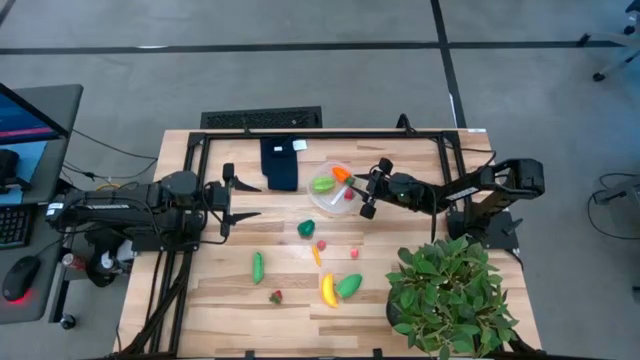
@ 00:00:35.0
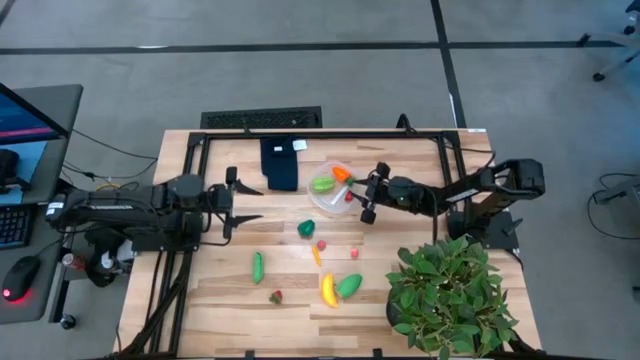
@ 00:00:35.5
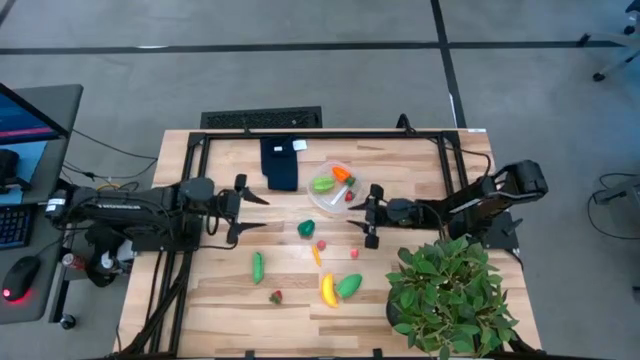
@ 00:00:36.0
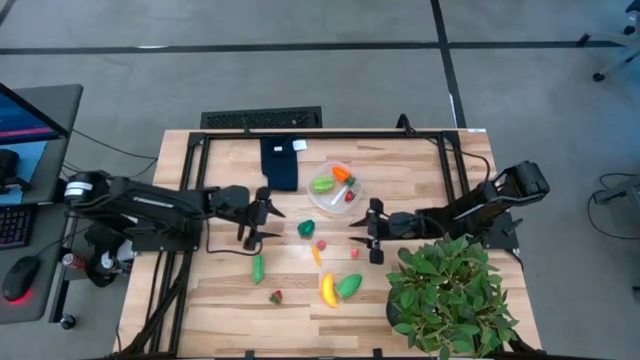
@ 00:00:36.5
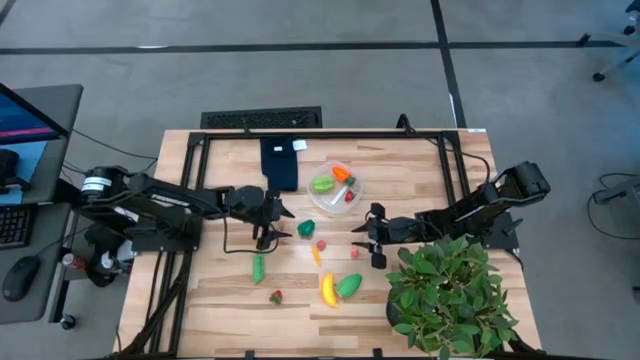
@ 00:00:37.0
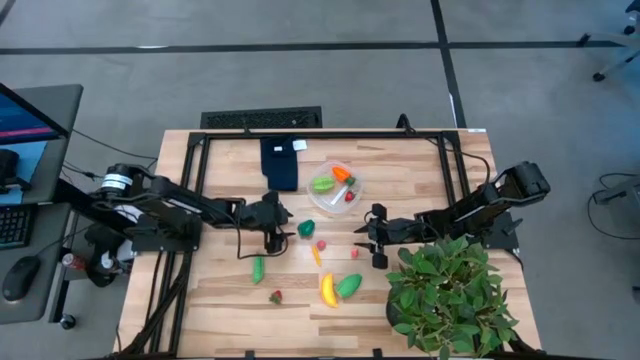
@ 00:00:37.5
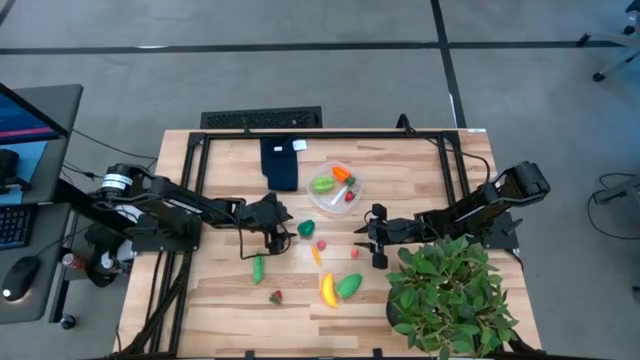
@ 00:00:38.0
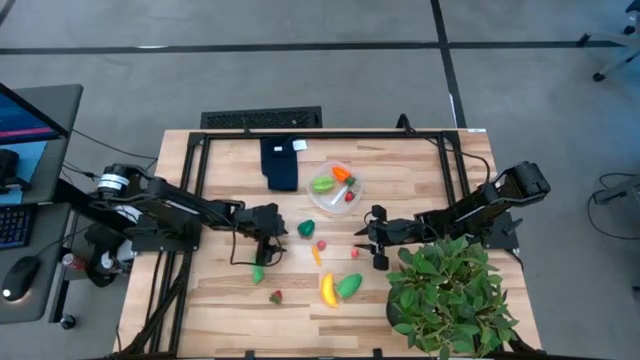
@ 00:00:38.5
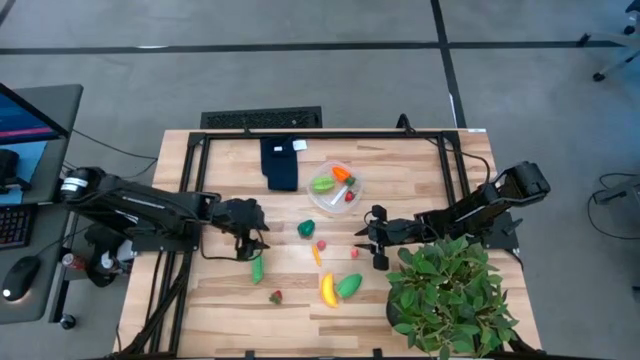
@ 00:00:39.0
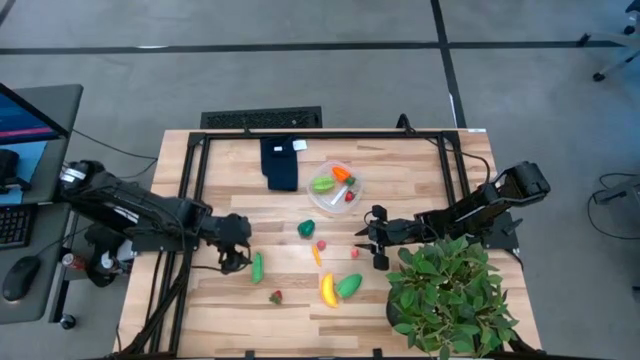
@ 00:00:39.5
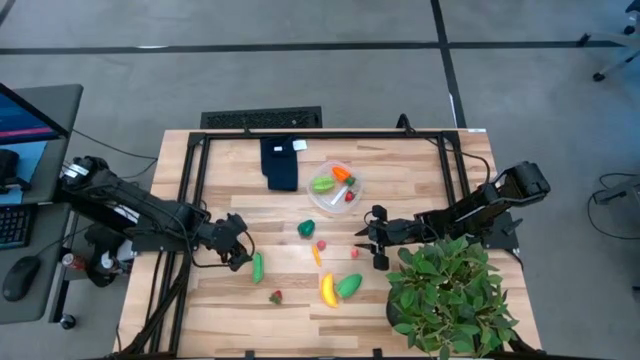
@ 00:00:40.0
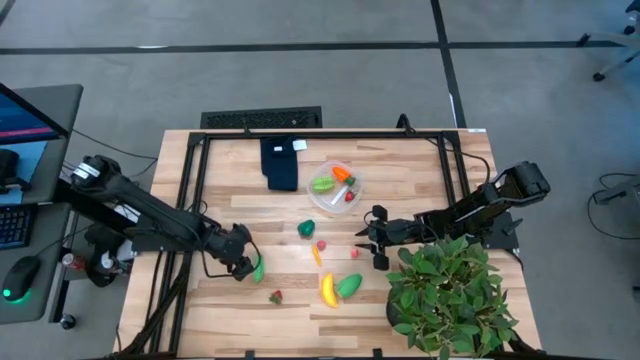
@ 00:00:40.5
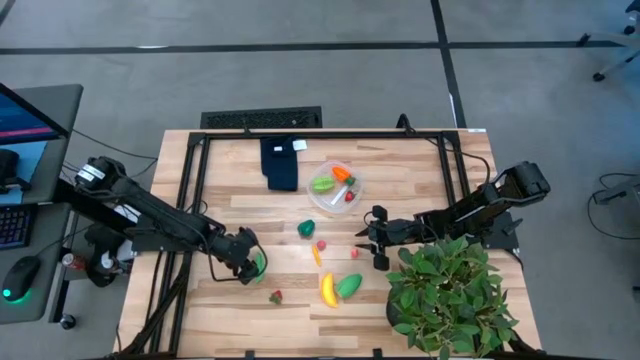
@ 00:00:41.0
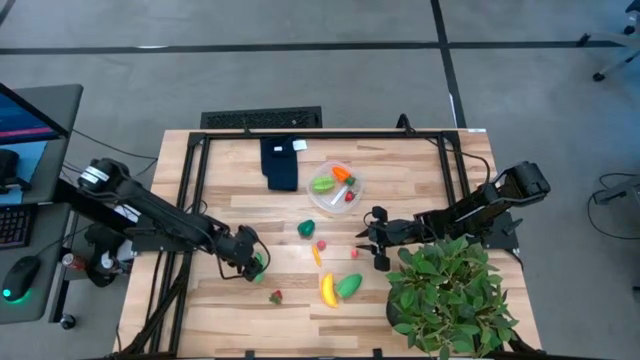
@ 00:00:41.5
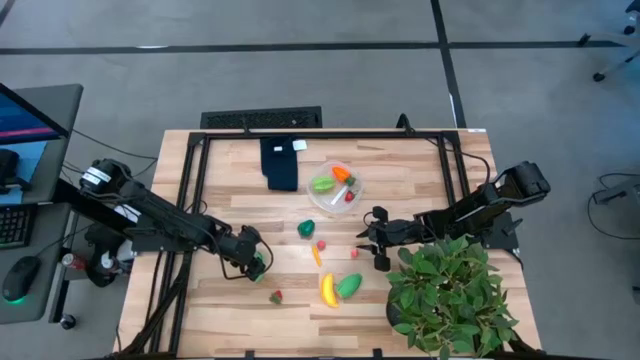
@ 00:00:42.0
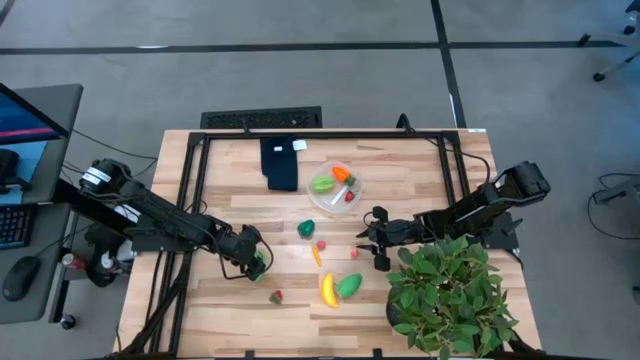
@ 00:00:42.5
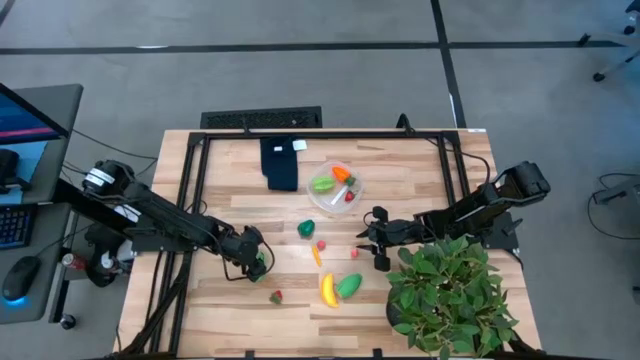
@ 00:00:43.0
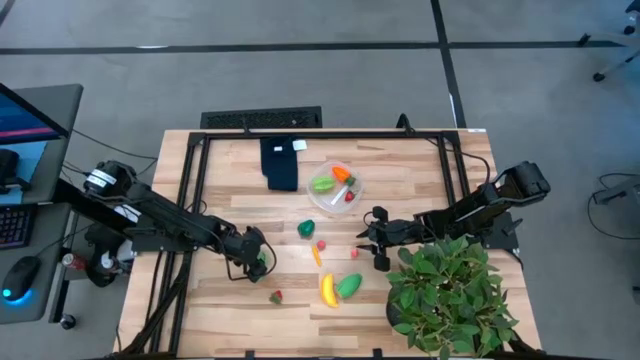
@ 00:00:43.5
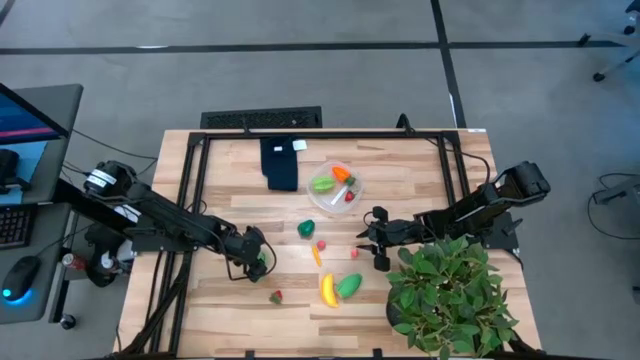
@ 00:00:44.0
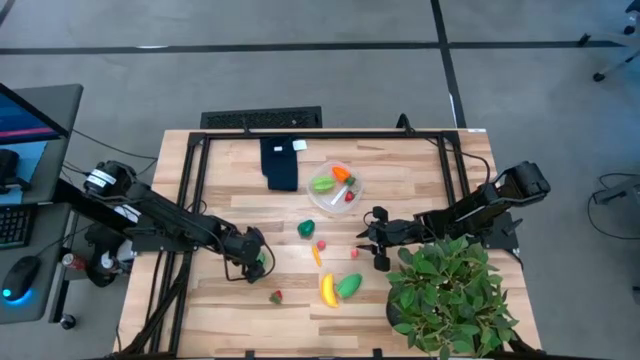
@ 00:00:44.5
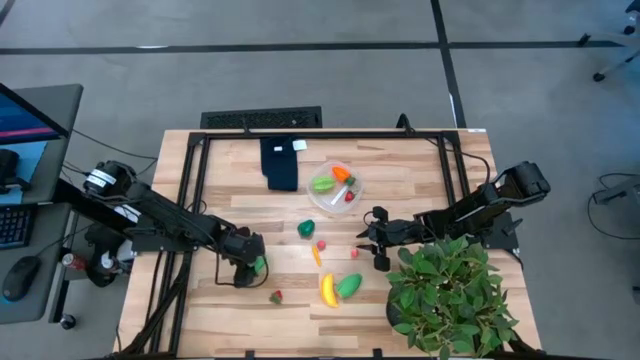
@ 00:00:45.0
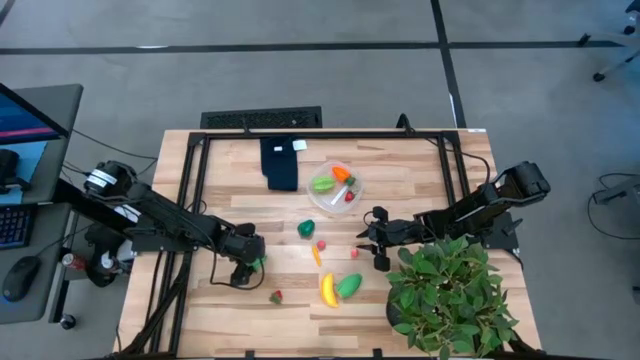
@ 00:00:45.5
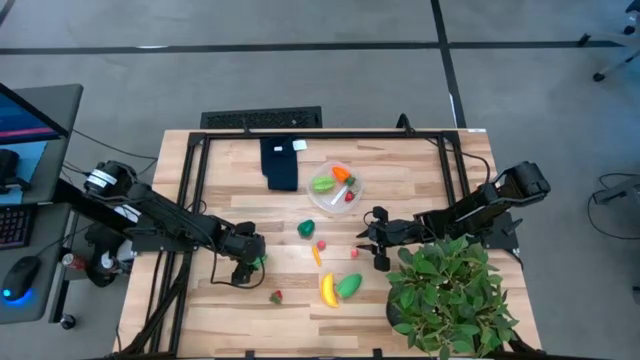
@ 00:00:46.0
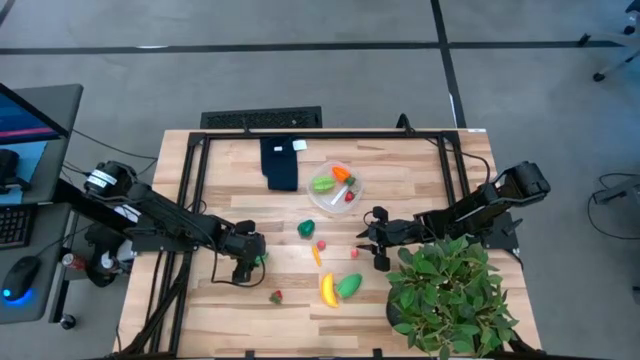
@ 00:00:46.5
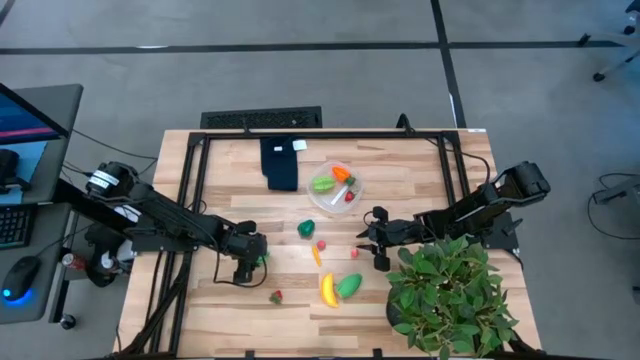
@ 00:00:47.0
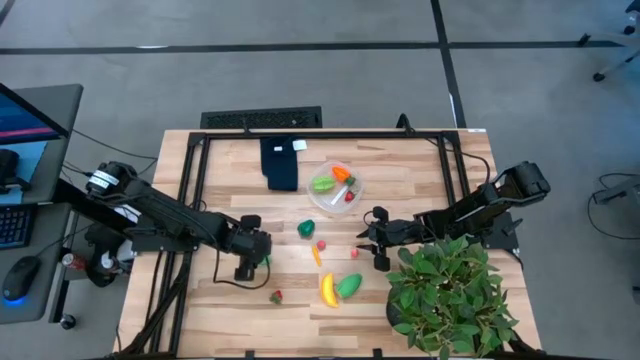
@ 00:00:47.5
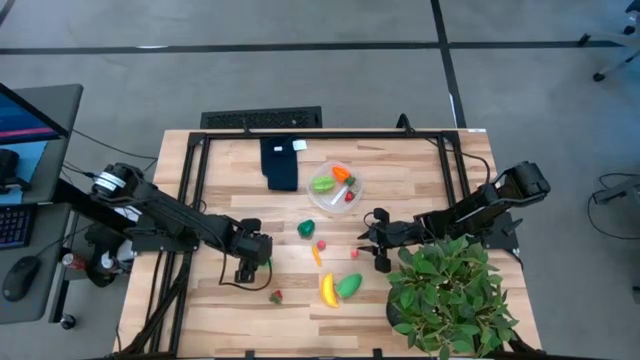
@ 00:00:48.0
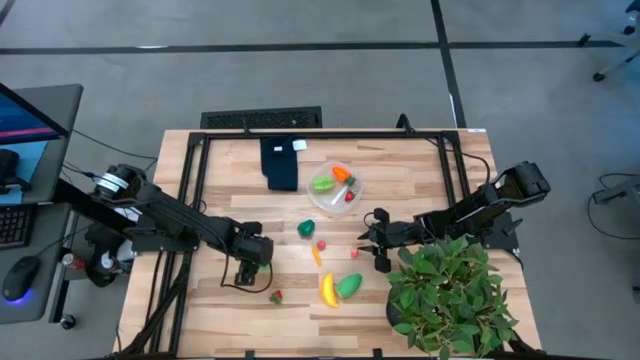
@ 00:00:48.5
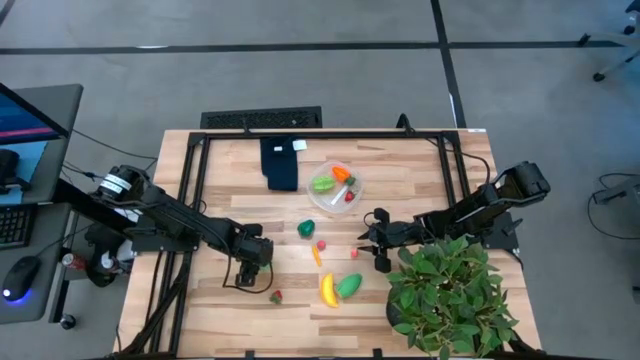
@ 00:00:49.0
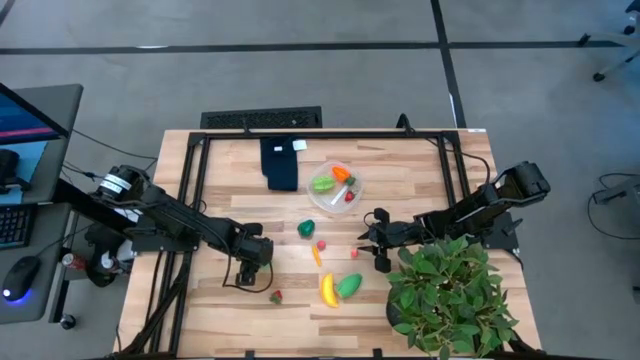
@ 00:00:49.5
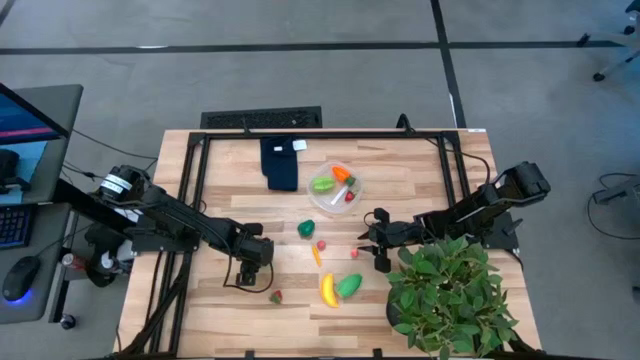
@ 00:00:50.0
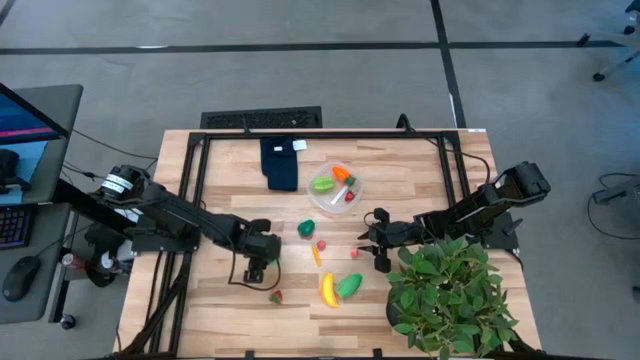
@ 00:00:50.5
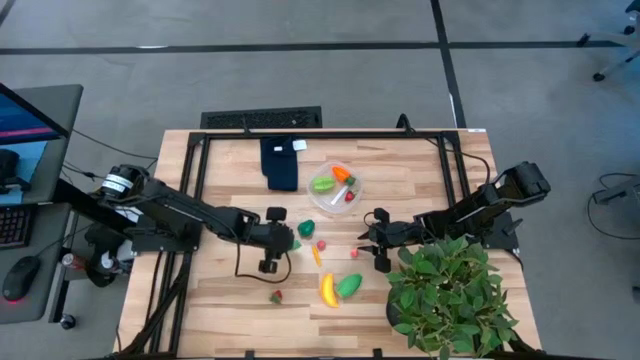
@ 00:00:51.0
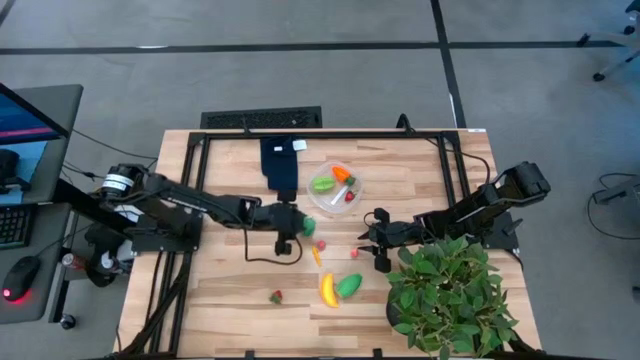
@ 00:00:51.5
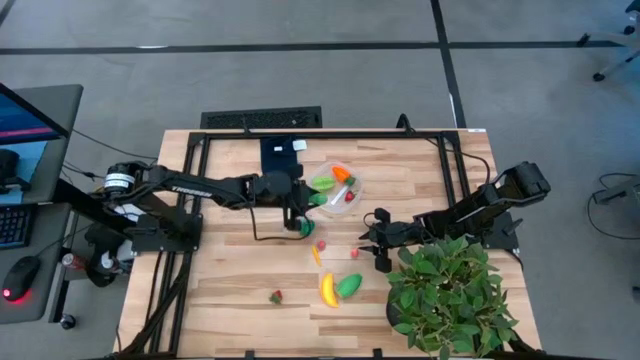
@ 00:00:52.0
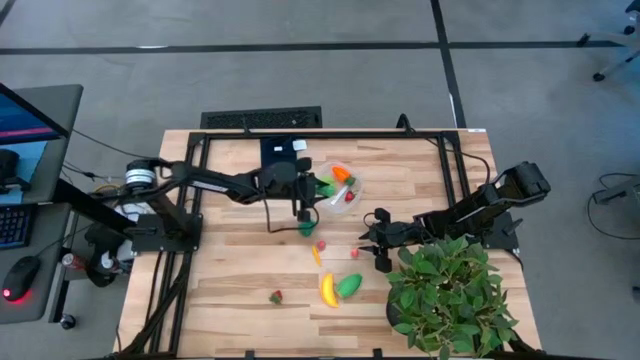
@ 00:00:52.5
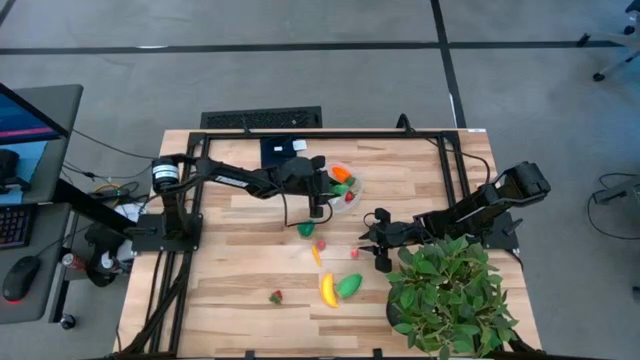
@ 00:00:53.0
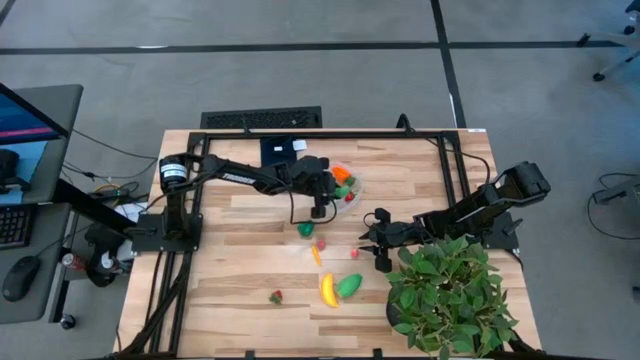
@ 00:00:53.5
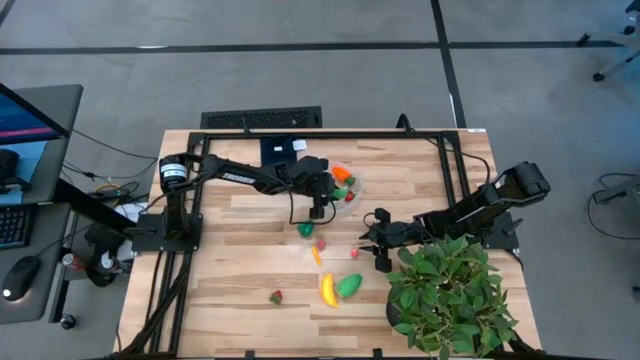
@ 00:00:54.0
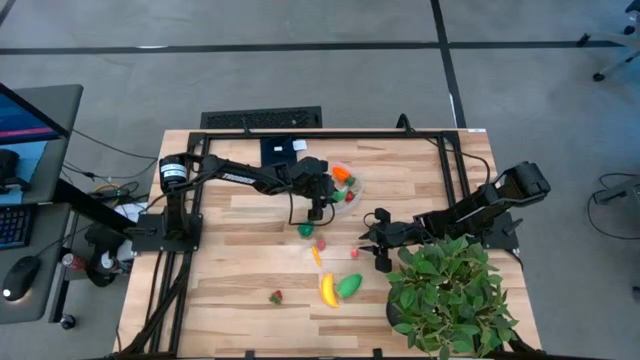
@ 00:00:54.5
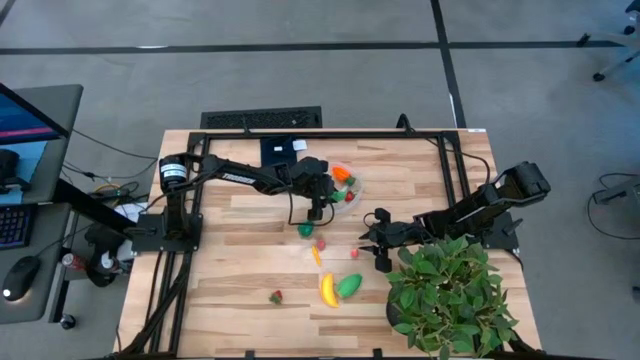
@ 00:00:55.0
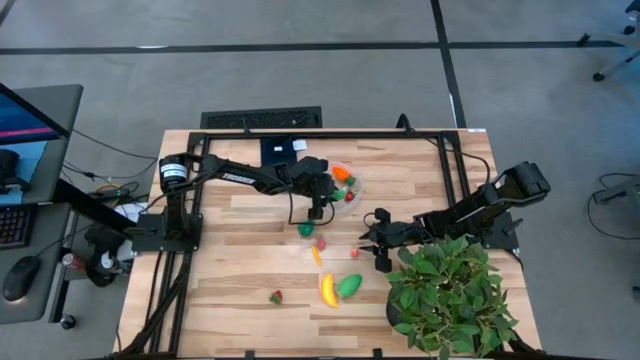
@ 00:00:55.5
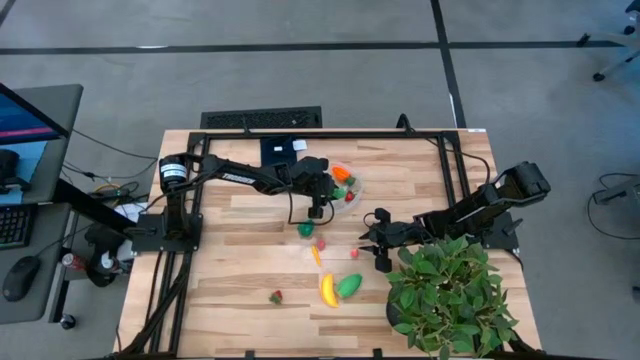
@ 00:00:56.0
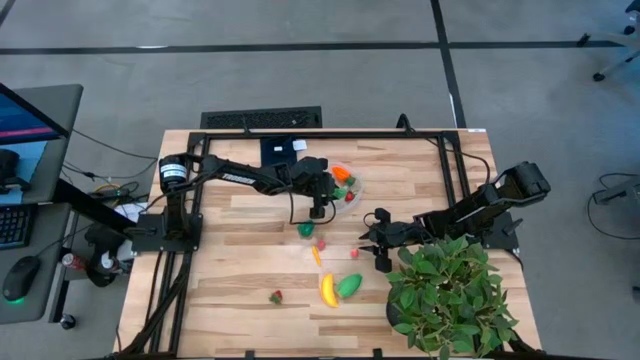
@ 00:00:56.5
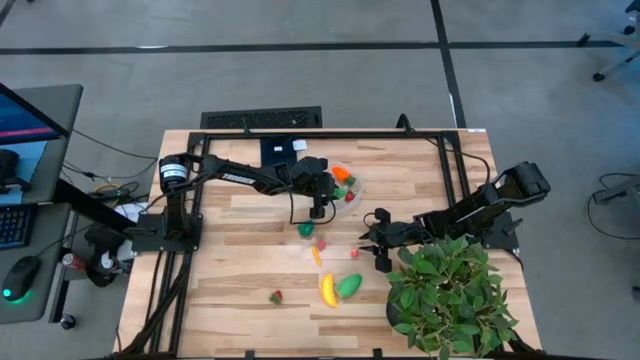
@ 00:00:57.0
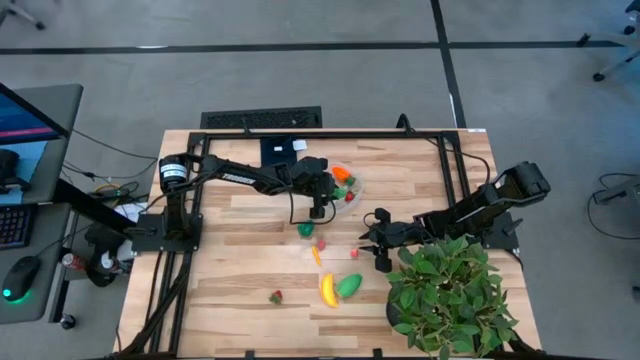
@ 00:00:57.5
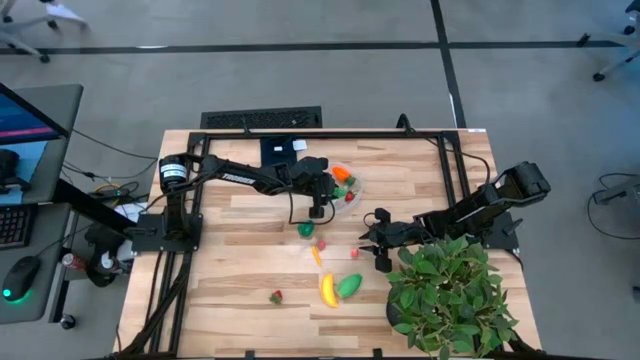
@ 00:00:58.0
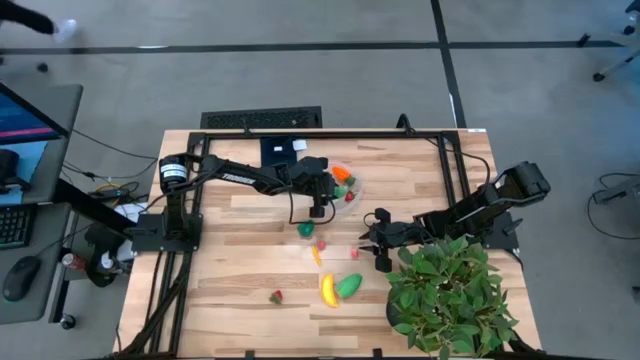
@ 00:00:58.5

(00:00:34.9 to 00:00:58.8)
Task: Pick and placing Produce into tupperware
Put the green peas into the transparent container
